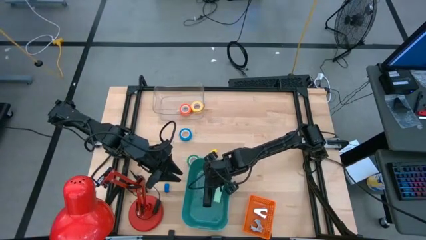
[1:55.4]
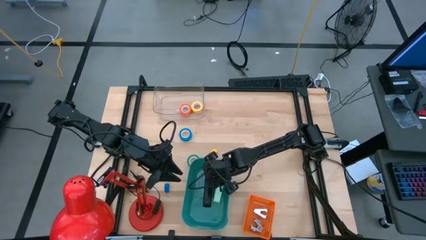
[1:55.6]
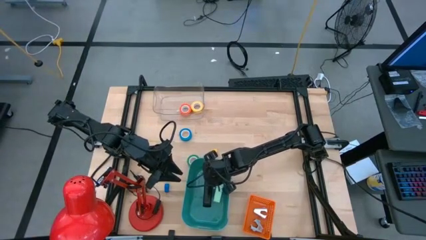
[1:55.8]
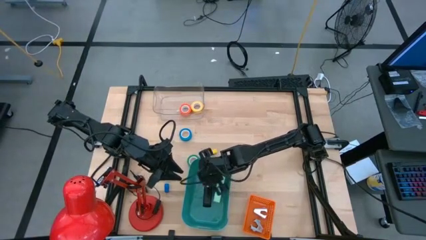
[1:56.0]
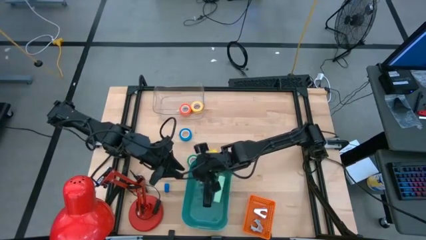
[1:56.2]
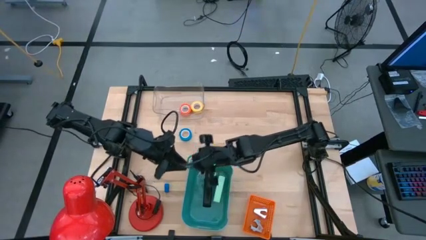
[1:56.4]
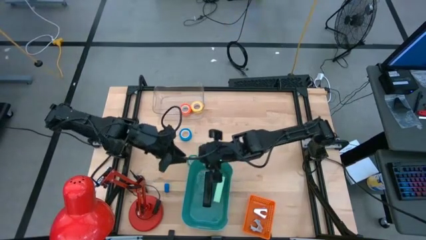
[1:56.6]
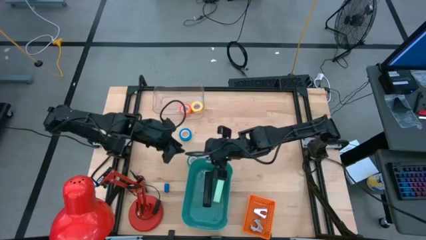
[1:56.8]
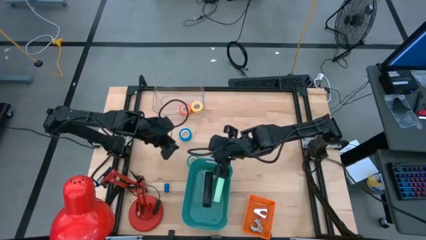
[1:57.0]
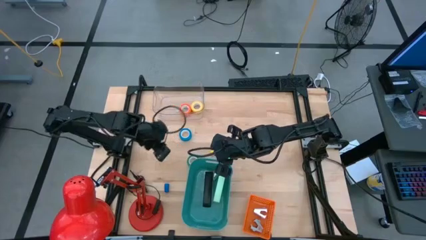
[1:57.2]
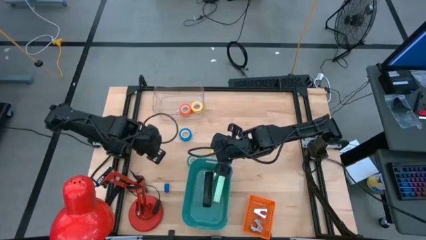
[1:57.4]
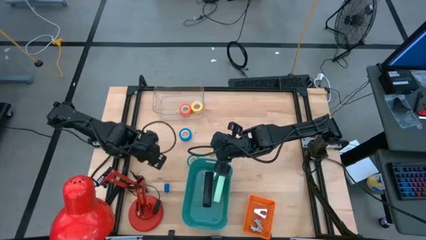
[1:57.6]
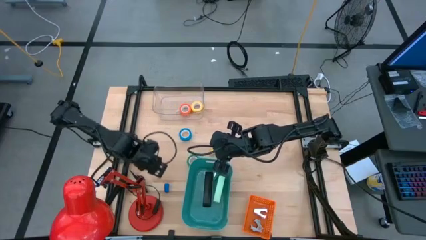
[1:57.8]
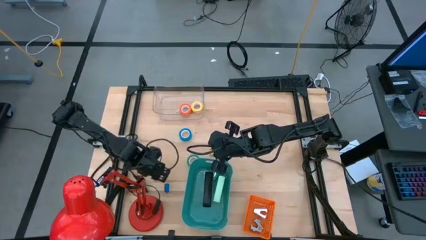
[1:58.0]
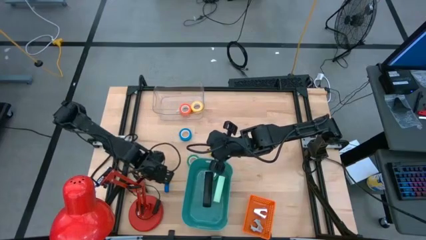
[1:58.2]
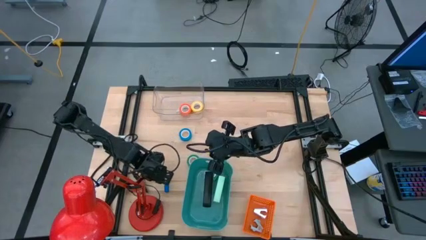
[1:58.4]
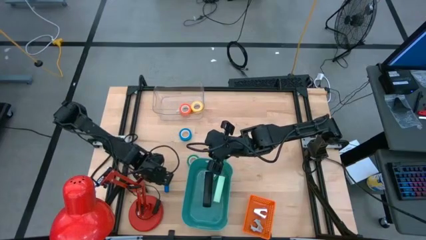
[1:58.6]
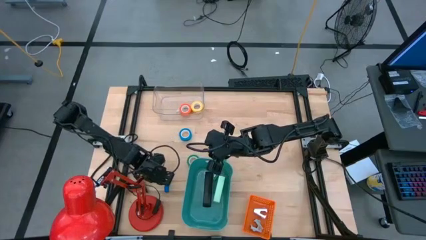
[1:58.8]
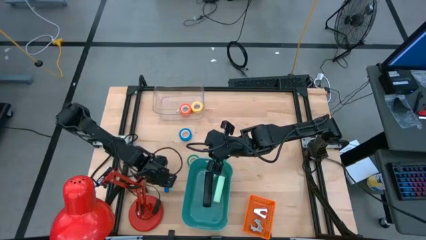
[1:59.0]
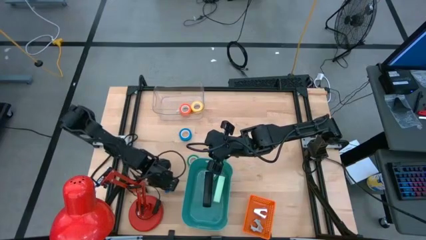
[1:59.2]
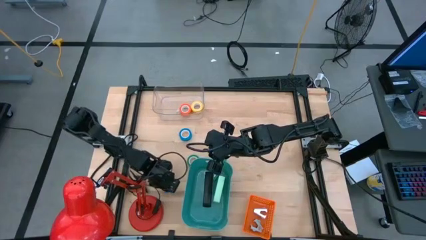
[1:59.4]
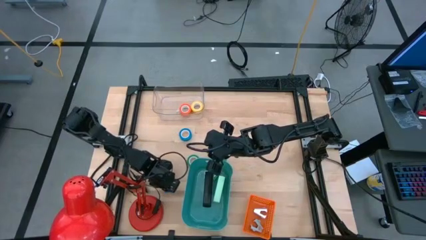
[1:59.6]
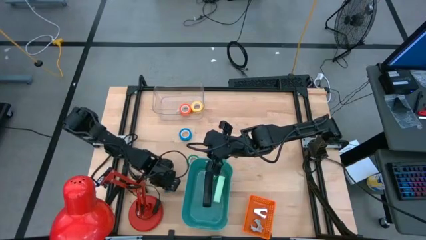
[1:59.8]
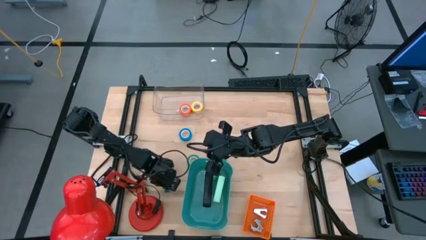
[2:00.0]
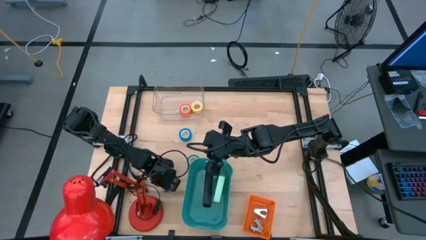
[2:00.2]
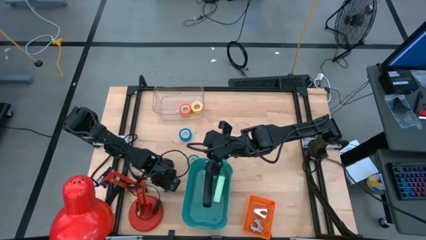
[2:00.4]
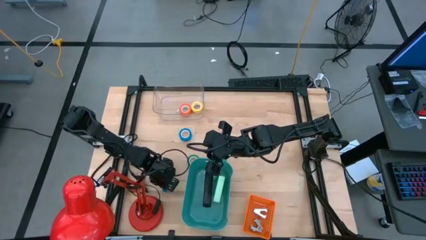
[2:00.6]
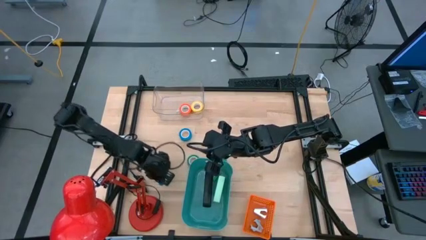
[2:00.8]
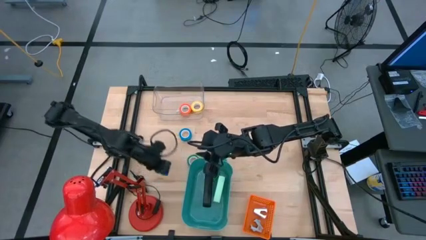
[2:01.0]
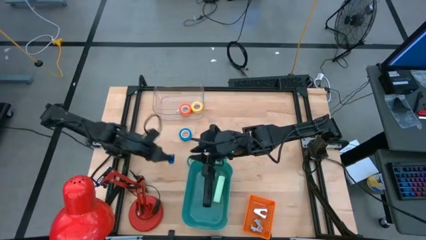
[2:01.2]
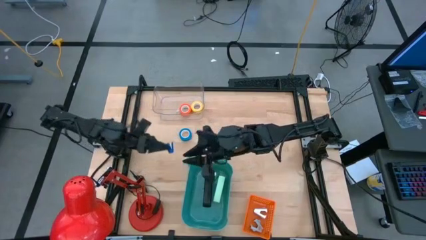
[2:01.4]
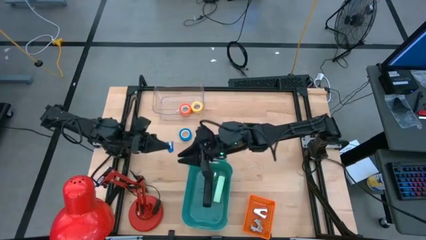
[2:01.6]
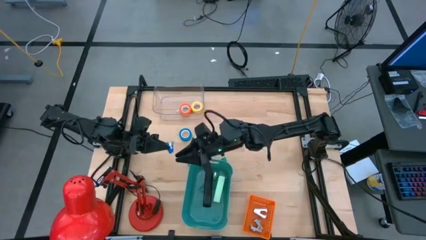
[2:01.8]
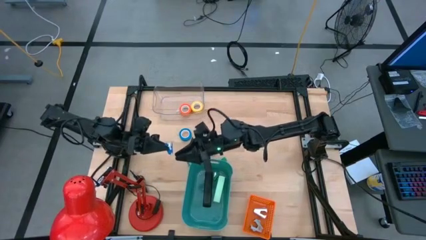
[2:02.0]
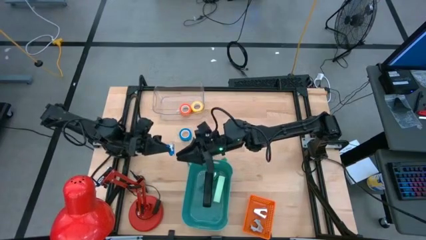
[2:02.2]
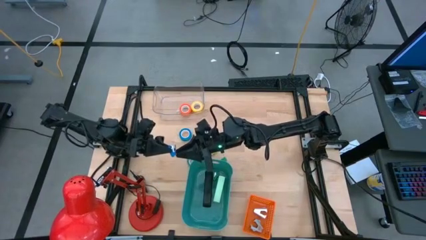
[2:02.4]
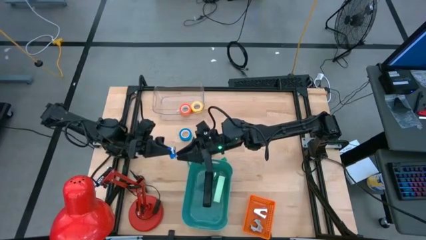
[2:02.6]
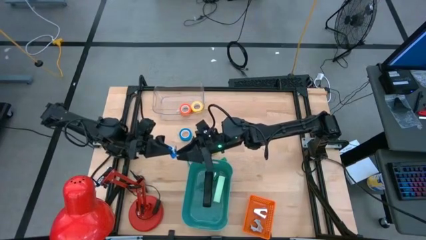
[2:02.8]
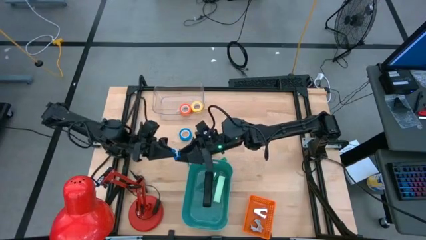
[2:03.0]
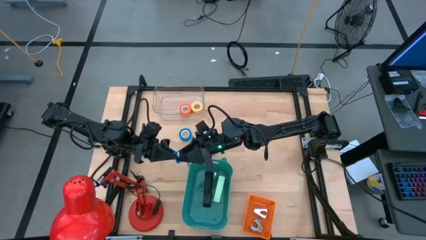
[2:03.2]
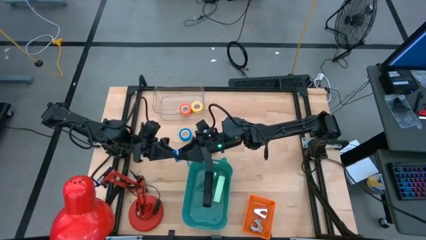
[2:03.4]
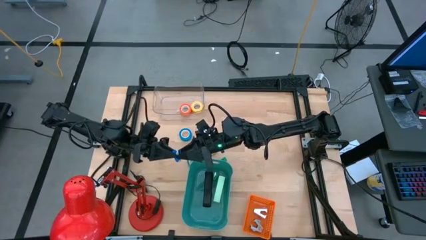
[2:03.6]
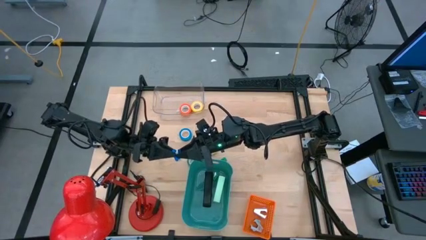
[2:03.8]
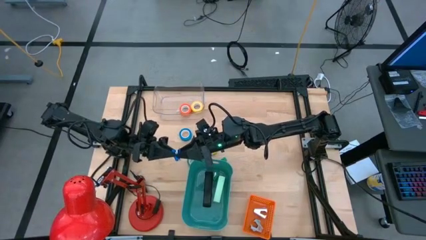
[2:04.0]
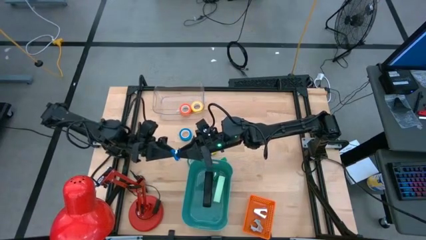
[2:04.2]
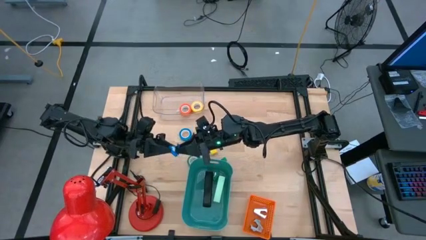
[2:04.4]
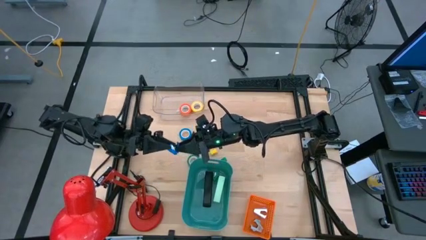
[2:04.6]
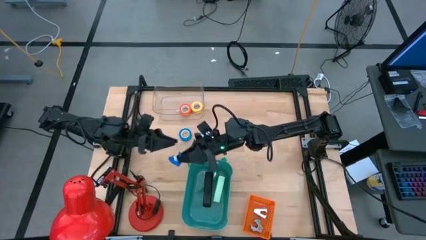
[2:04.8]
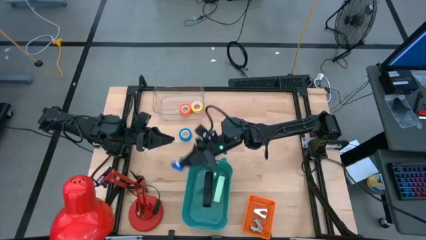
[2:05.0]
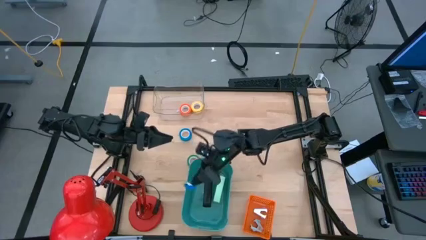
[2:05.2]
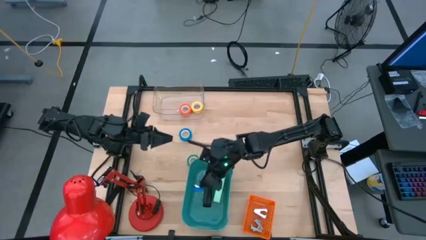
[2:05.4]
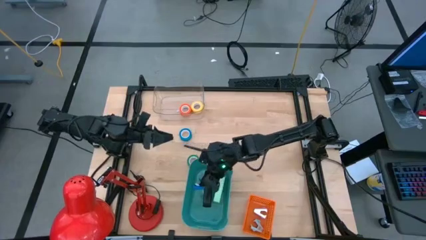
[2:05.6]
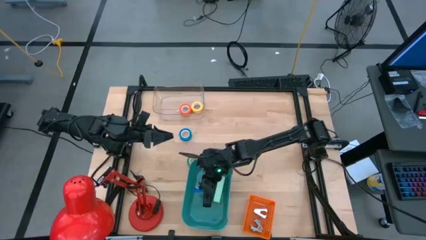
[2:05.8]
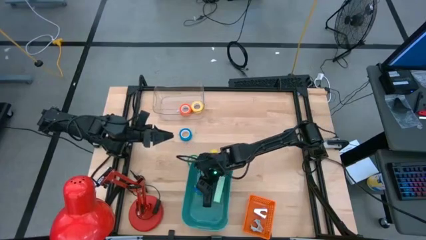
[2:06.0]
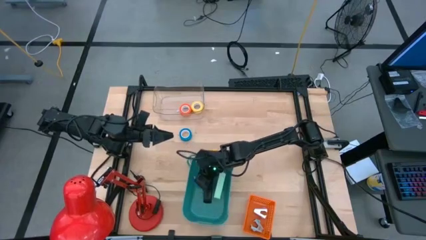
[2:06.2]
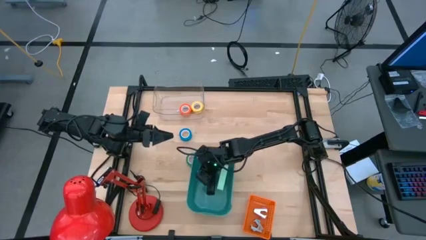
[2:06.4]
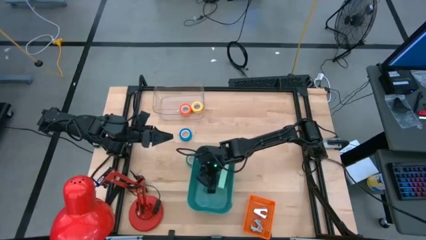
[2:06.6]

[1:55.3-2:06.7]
Task: Pick and place Stapler, Stapler remover, tape
Put the blue stapler into the green bin

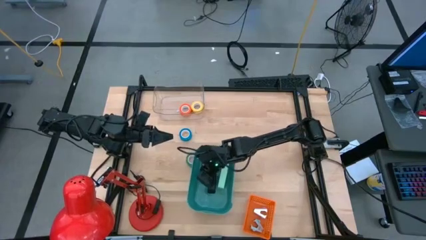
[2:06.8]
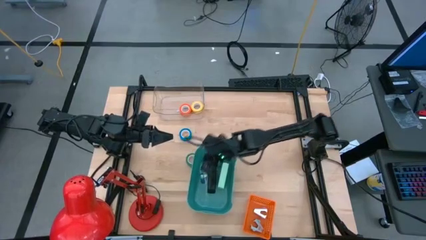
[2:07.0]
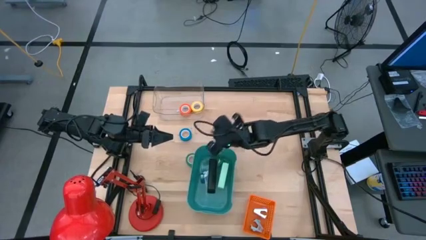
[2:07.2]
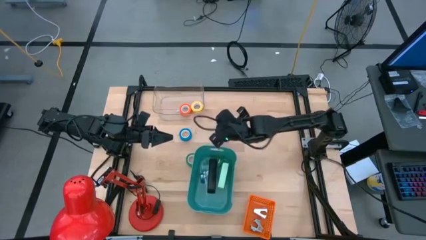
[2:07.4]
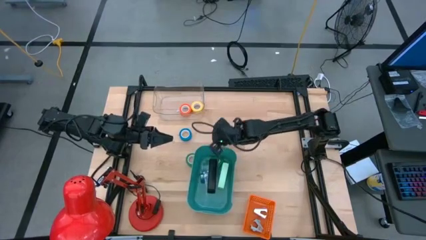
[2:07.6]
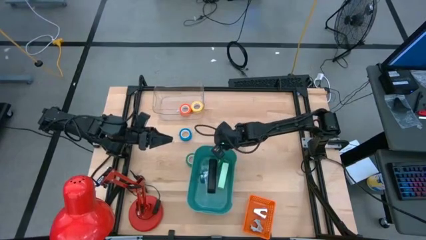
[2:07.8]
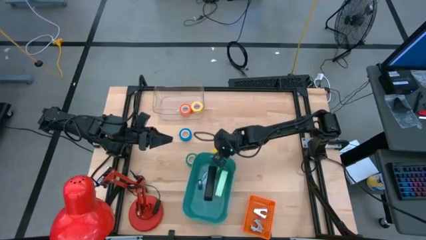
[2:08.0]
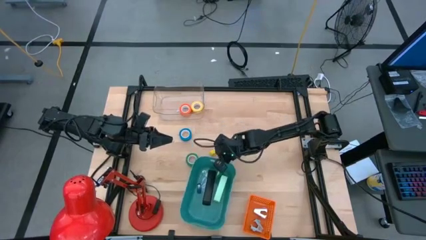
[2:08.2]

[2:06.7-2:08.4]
Adjust the green bin

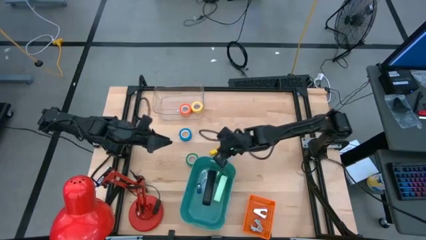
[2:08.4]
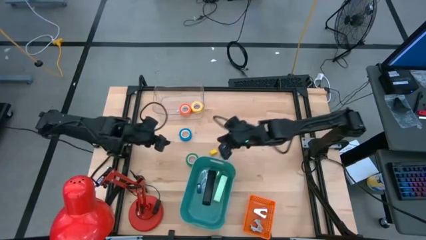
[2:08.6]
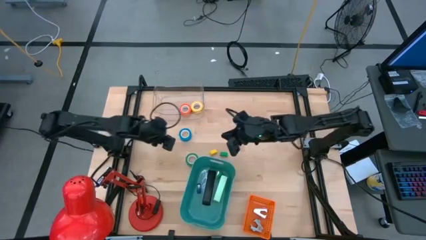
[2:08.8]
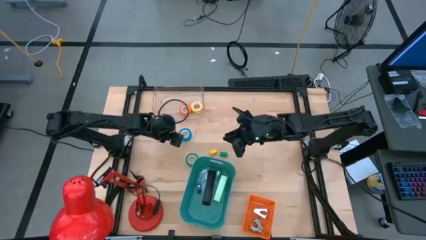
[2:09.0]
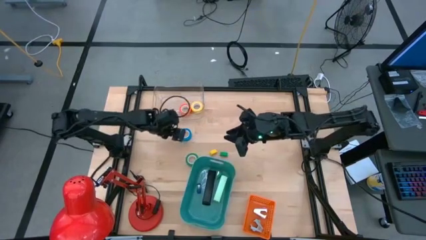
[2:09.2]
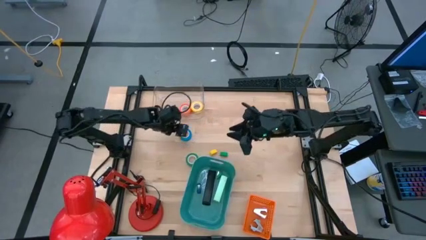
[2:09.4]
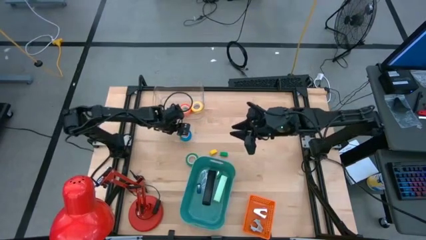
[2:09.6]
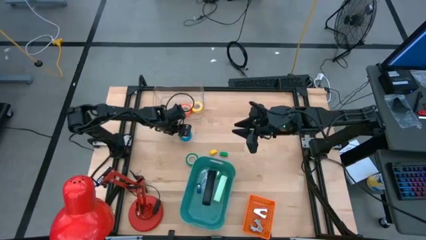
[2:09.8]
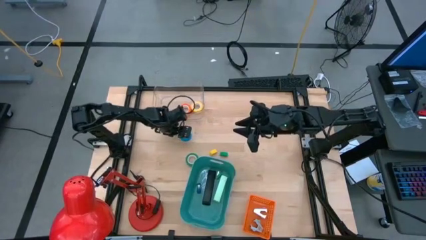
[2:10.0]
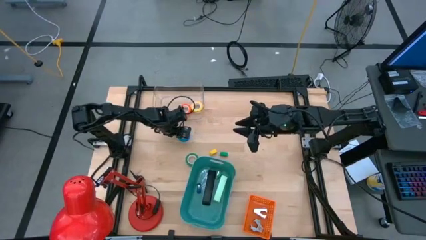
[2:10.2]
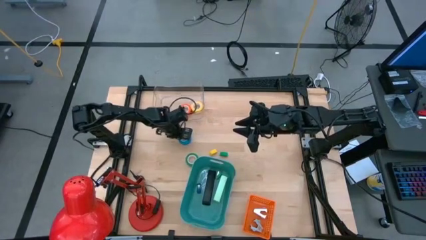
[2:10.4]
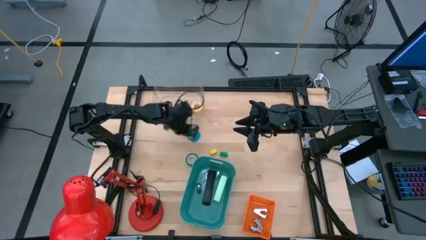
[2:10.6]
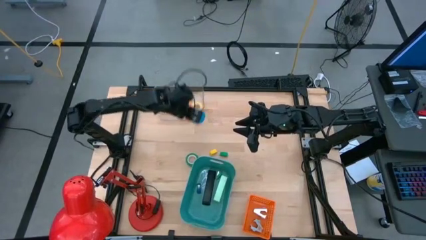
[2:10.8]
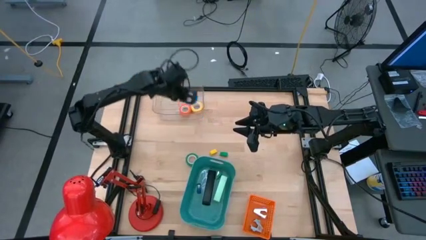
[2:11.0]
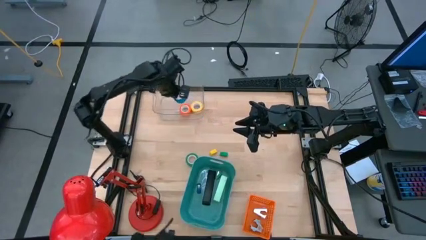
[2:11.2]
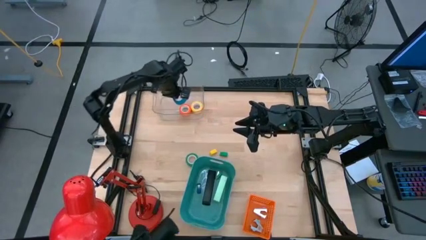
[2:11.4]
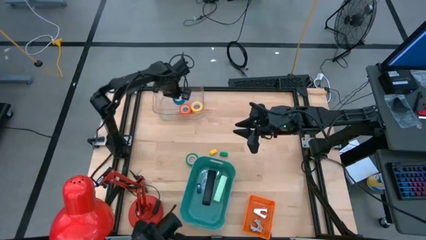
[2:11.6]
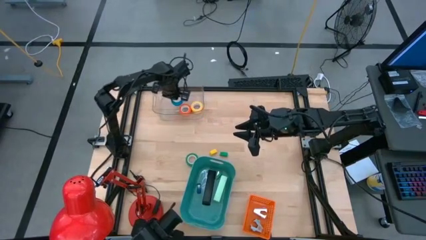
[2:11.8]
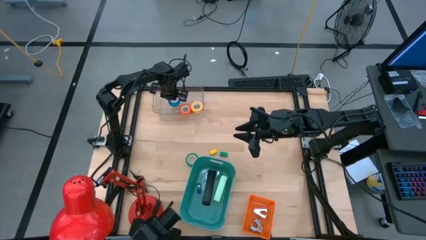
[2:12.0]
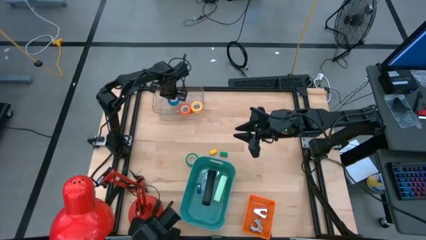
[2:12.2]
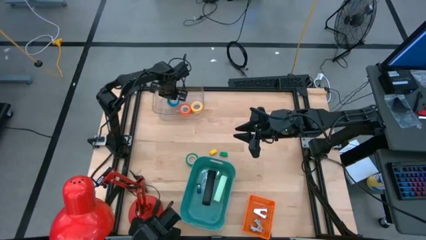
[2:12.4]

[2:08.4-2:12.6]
Put the blue tape into the transparent bin
